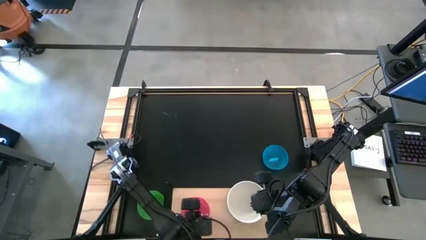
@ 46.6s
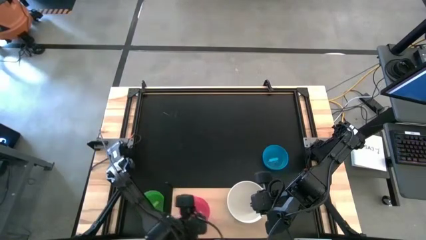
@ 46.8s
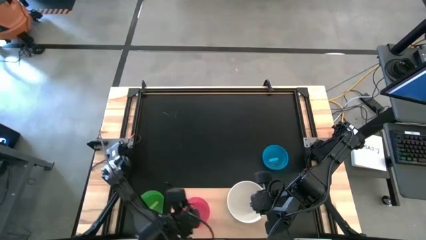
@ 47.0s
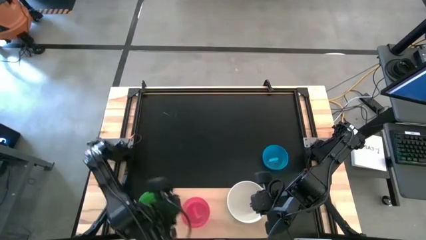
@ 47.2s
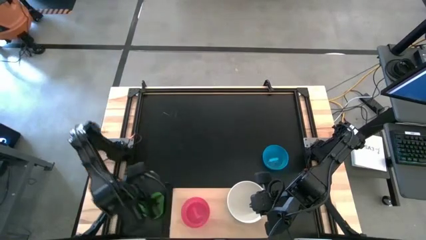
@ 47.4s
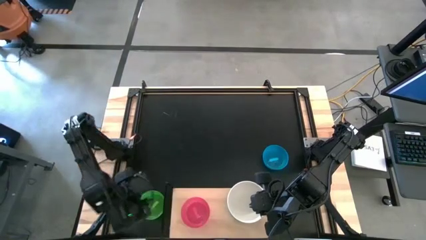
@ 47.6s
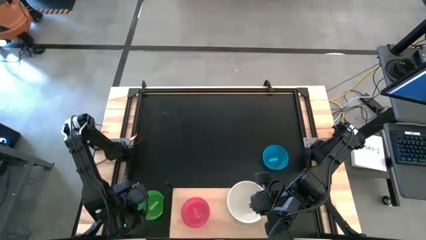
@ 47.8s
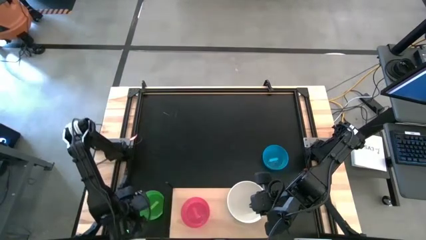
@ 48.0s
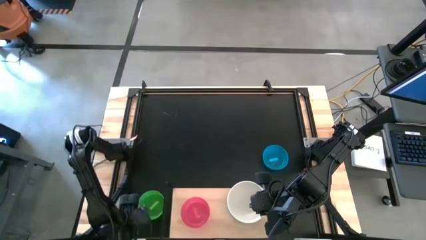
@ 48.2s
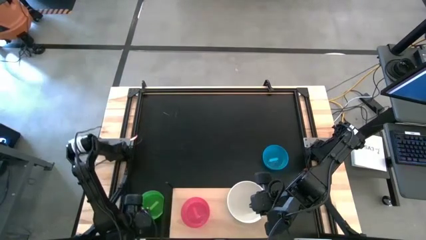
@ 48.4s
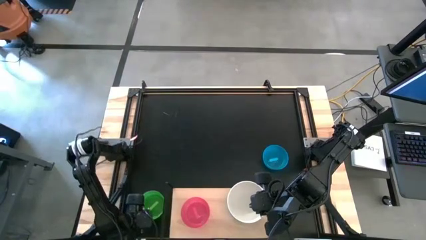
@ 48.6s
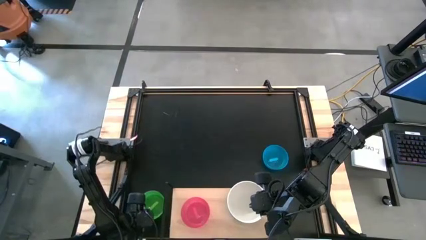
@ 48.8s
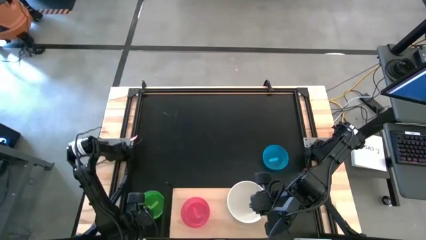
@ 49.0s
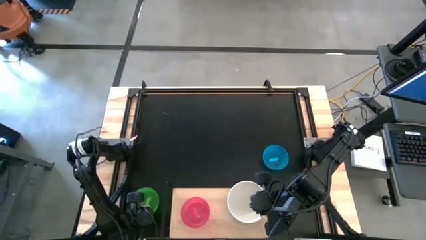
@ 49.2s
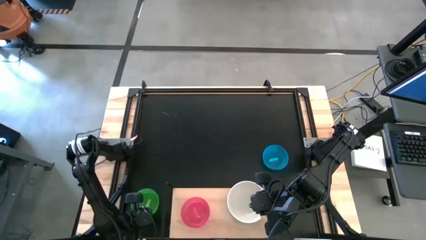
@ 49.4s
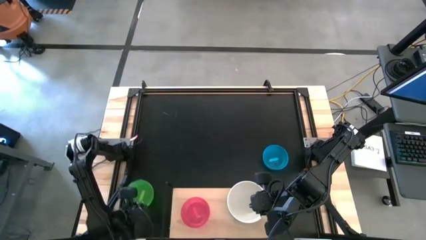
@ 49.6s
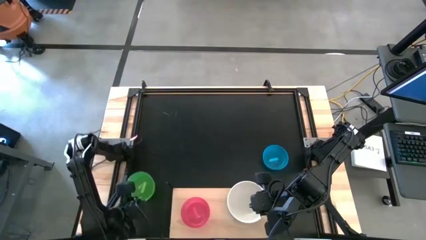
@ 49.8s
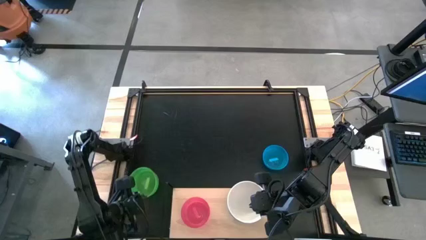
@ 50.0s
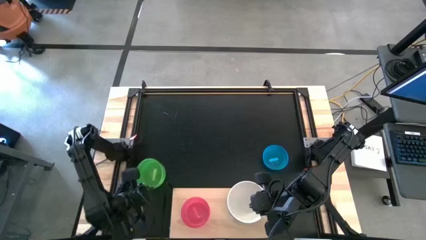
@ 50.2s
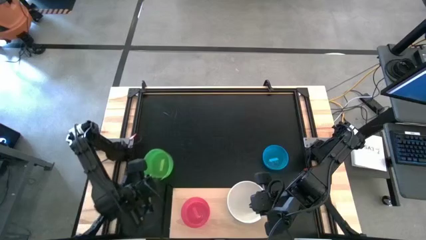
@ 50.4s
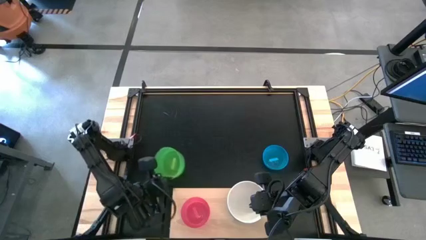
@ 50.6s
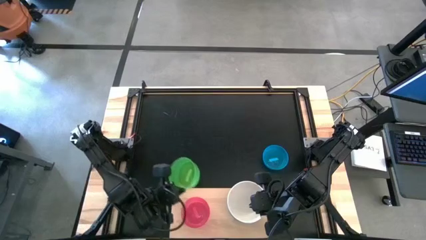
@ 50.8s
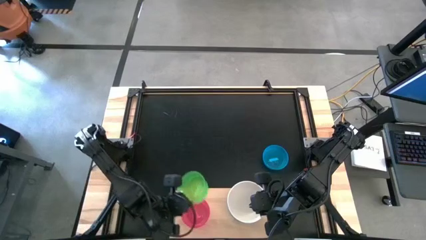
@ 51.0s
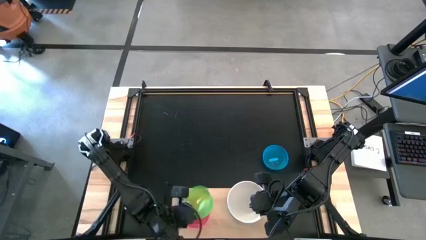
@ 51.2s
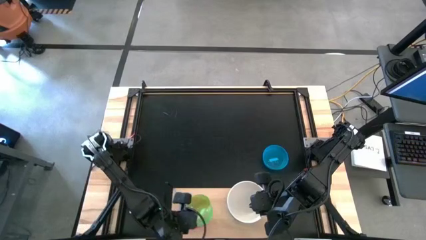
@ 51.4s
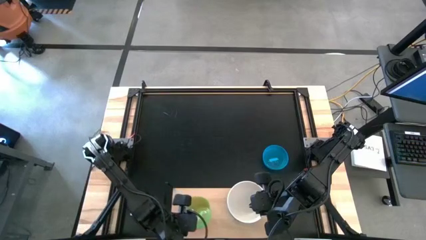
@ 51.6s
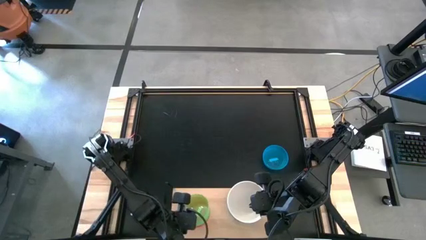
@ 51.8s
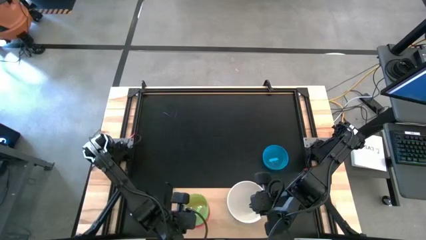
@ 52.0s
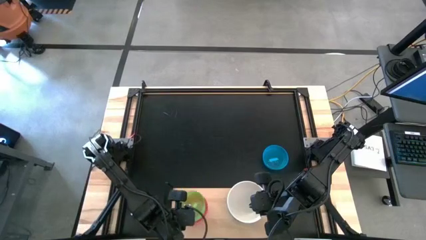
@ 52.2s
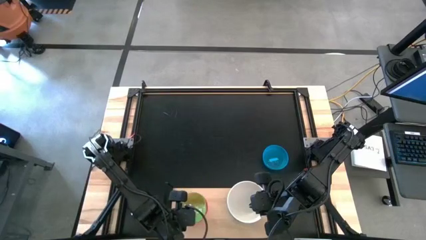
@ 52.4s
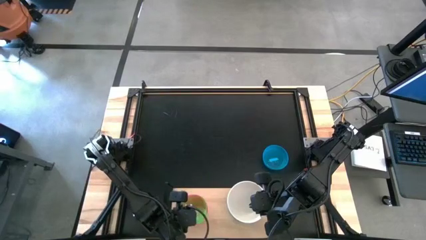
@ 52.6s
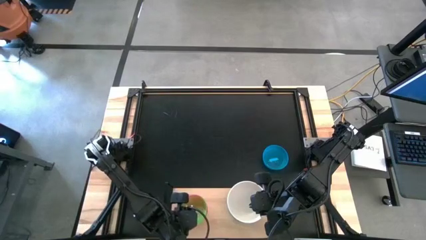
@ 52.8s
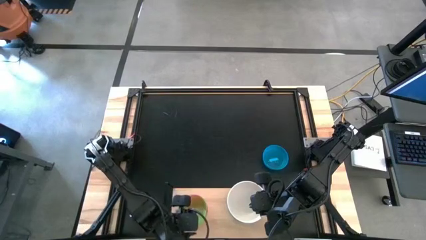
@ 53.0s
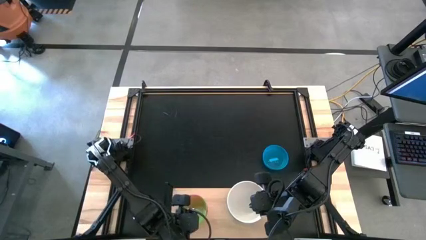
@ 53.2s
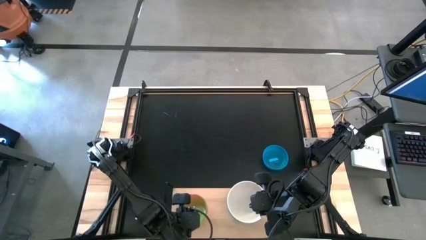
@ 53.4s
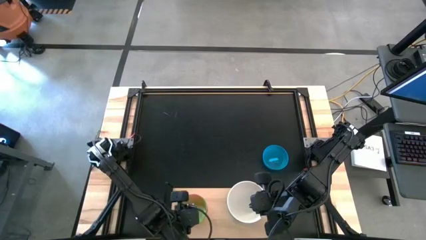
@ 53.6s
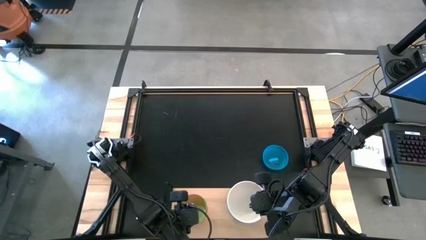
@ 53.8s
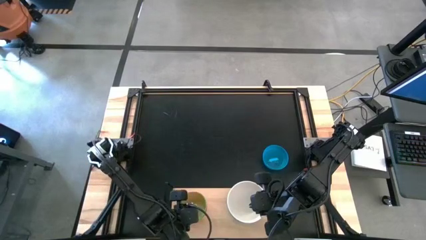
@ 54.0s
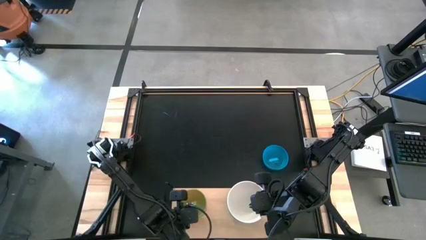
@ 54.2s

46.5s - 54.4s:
Task: Place and stack bowls onto a shelf
Stack the light green bowl on top of the light pink bowl on the shelf

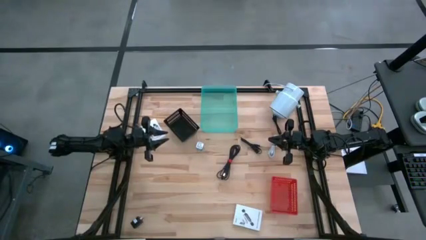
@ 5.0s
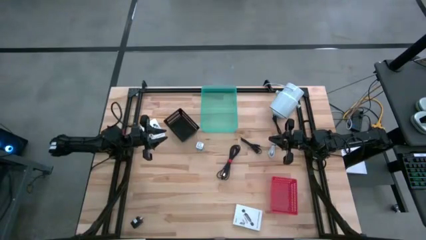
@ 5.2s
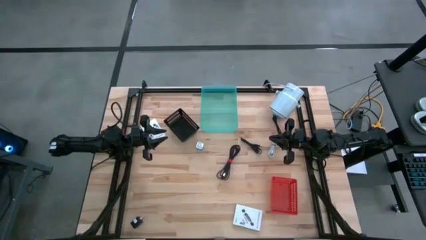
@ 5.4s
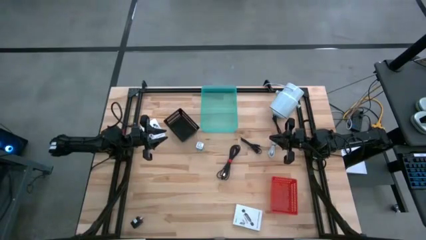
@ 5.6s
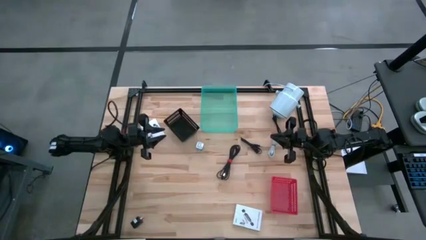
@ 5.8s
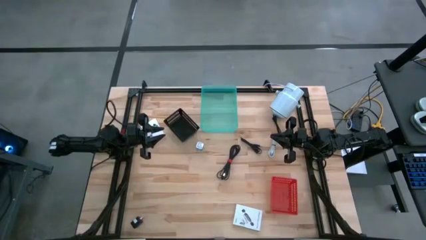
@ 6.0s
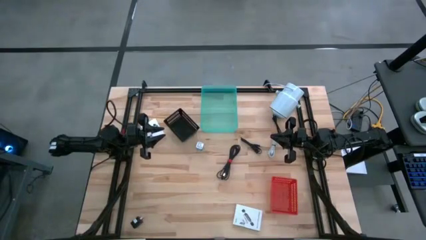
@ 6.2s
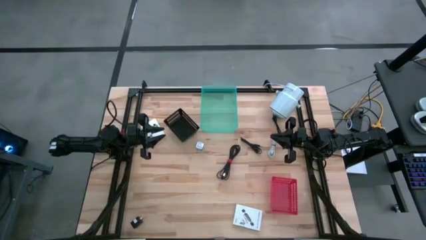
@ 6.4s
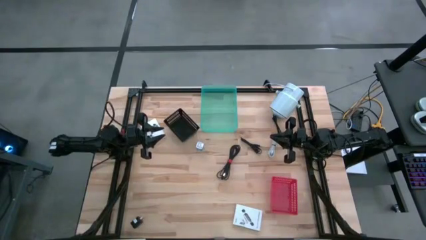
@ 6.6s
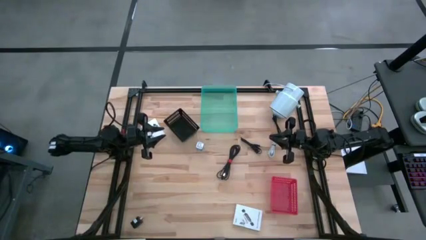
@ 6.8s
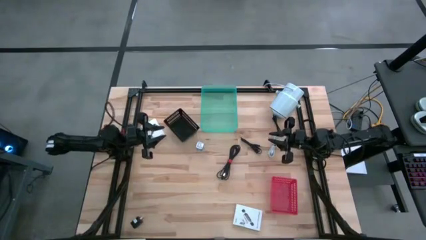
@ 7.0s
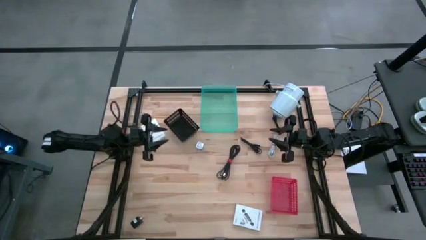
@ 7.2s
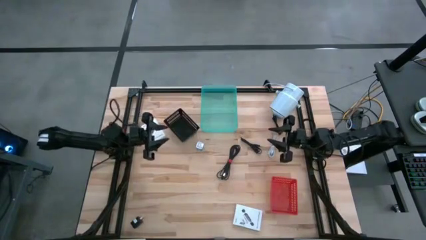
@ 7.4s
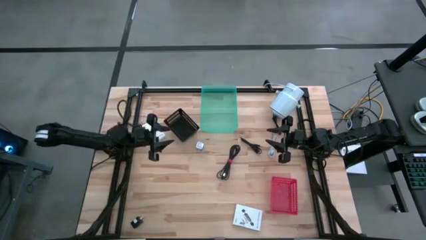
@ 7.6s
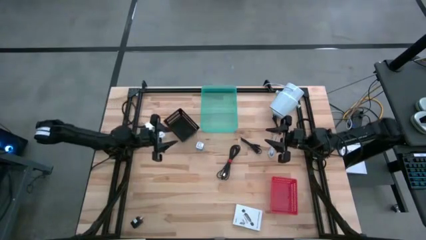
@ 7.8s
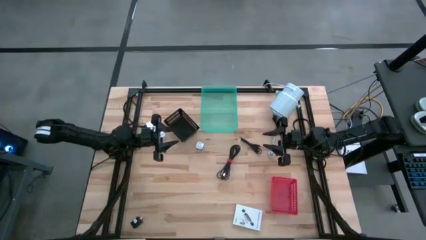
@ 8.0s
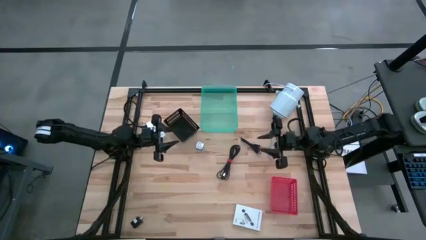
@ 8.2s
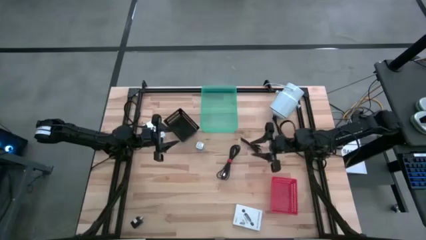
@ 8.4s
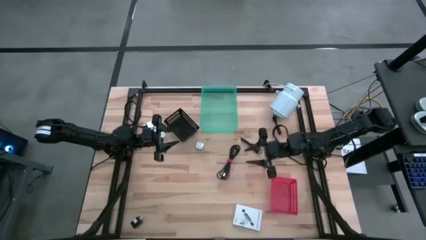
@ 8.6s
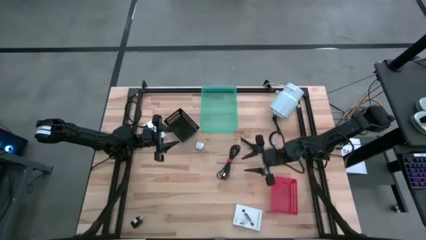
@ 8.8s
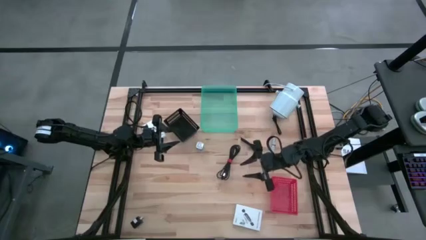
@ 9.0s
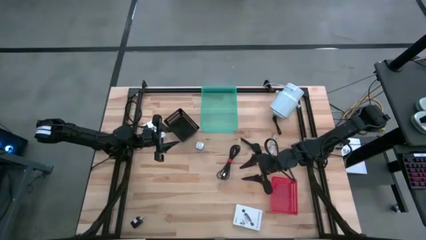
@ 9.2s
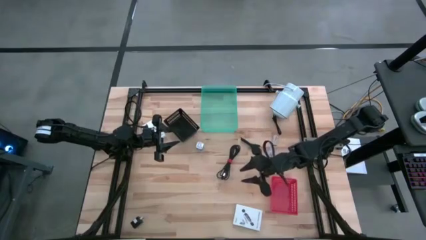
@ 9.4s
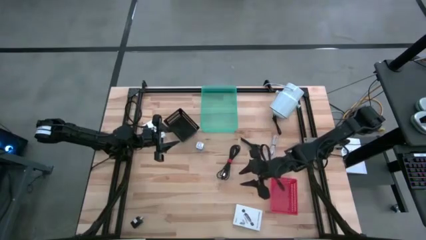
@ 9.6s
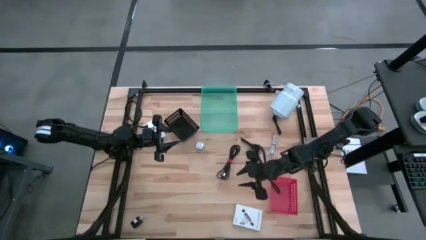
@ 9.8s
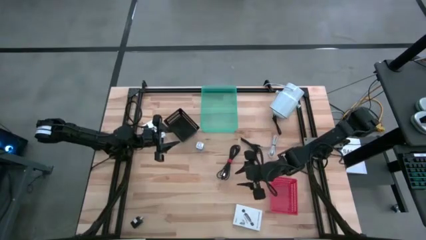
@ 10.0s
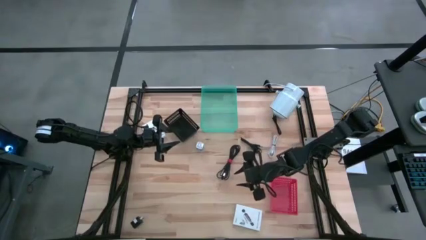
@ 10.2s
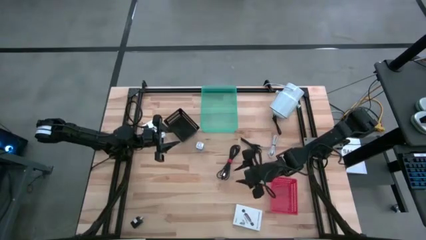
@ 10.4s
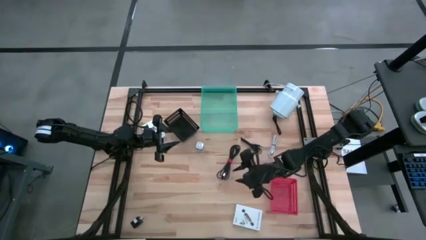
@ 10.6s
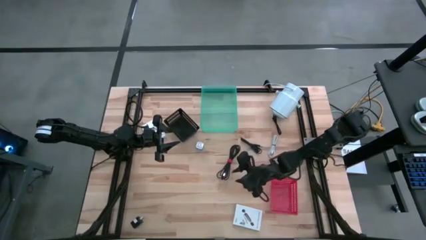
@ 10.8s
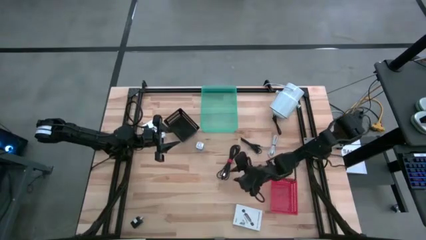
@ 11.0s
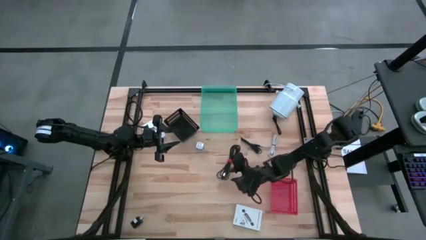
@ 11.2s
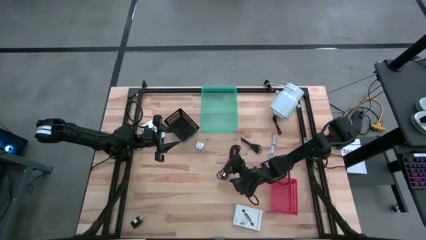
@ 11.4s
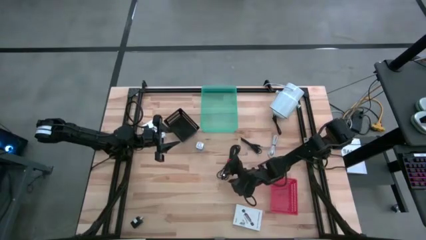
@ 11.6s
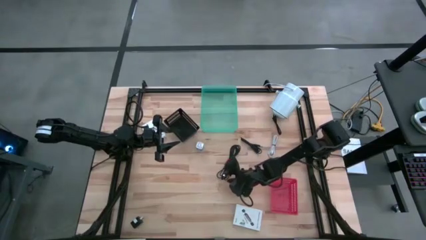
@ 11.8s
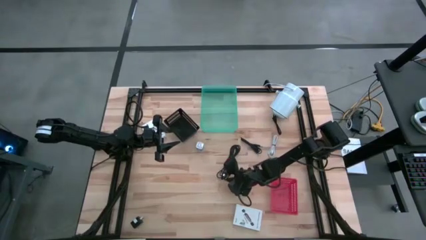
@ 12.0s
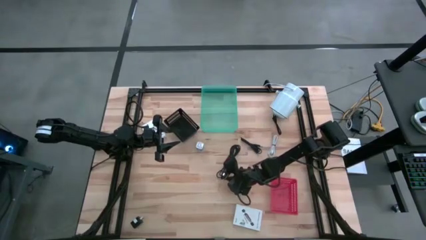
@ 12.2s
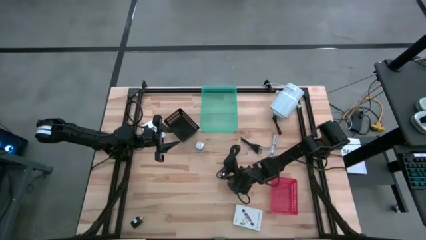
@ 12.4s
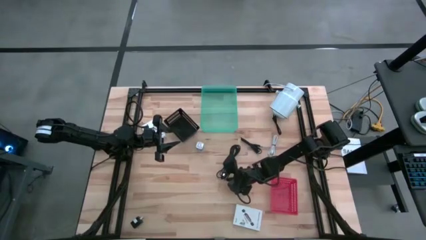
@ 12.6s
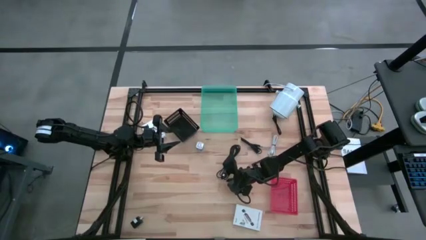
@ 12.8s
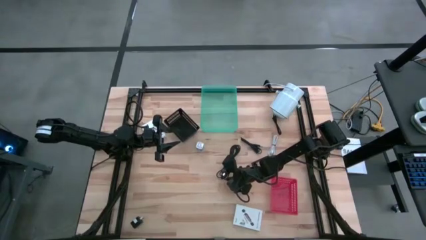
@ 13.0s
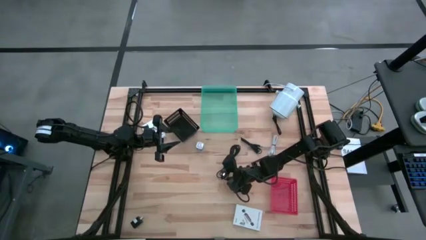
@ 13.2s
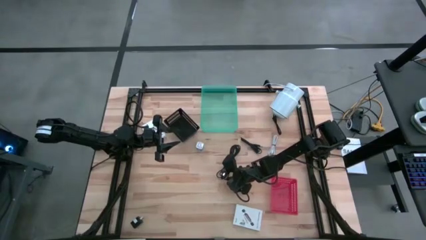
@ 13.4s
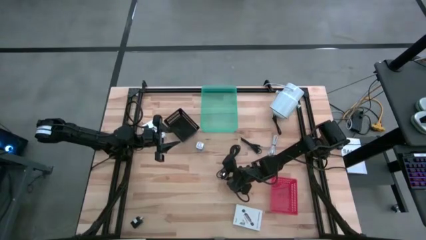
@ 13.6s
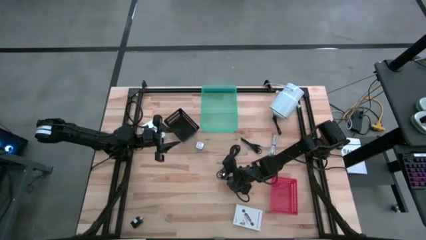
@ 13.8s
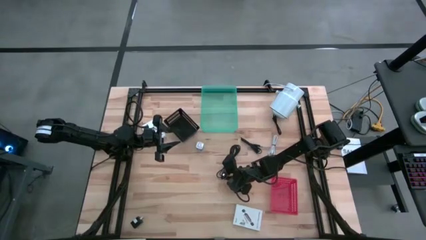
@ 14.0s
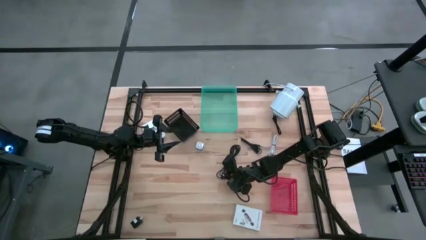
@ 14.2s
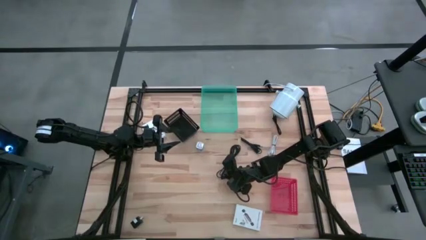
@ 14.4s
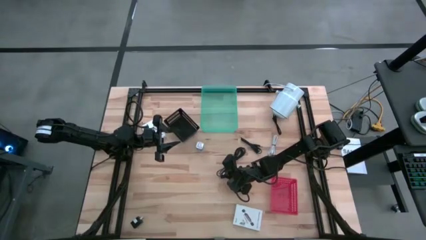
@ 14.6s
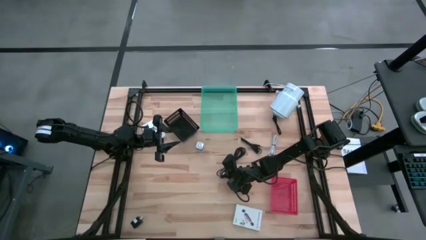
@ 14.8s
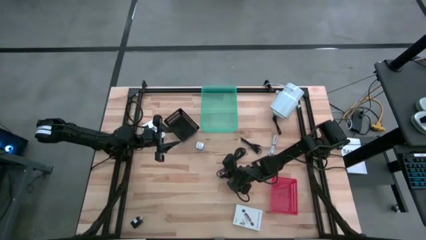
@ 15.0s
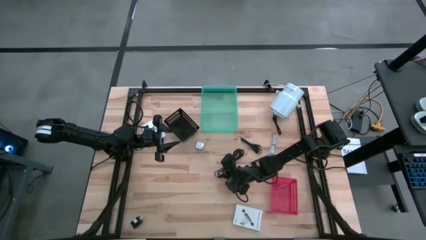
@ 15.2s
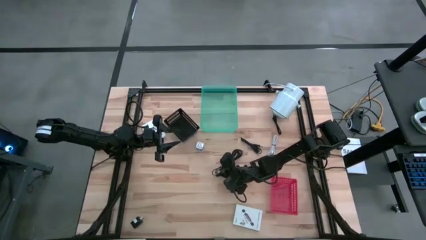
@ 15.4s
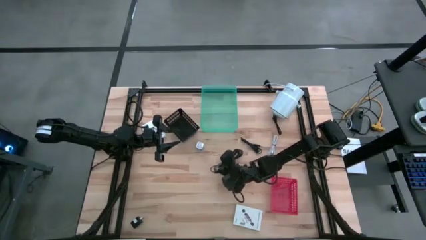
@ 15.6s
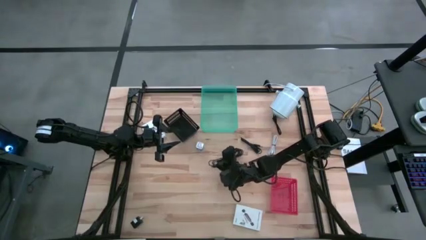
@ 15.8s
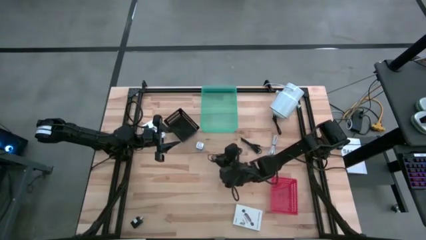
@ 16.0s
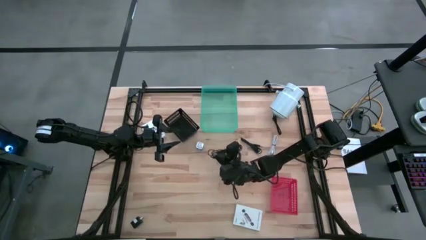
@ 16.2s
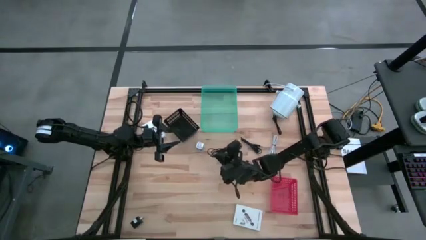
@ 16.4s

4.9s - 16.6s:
Task: Pick and place items into bin
Put the bottom black charger cable into the green bin
